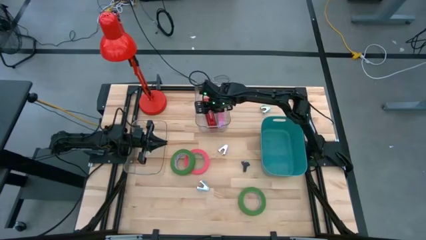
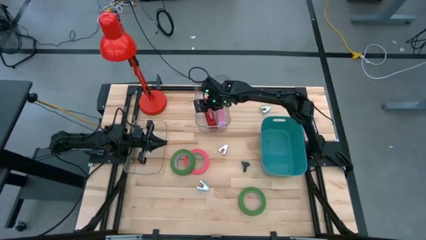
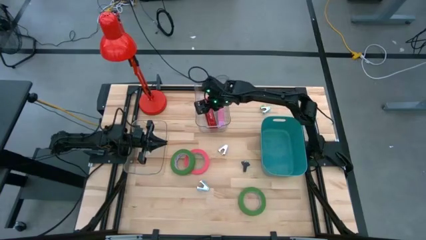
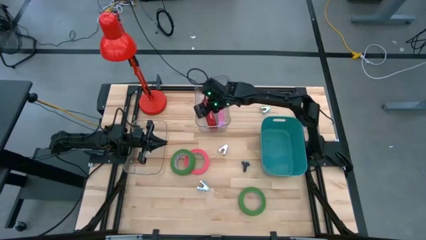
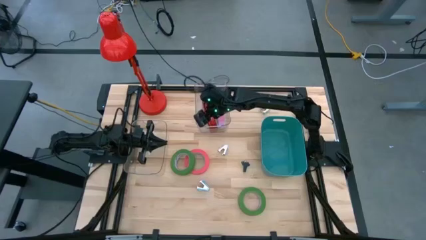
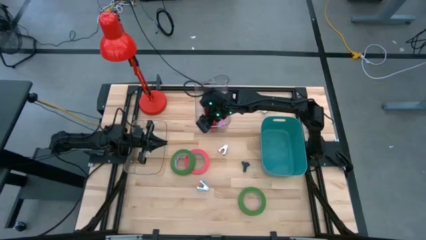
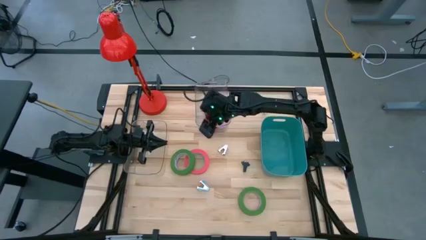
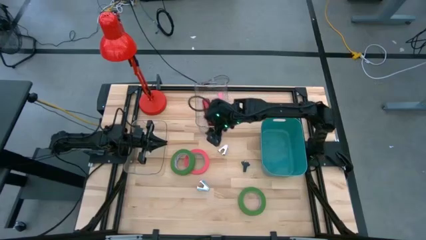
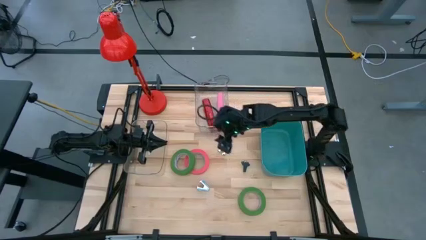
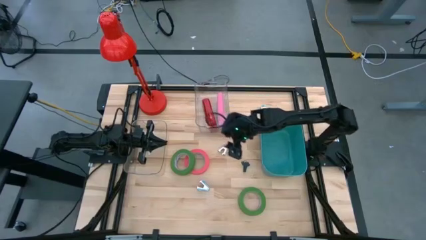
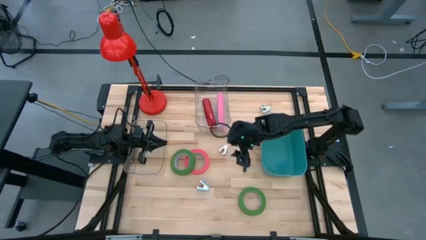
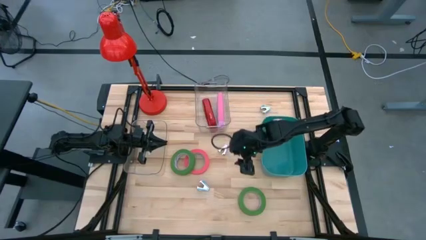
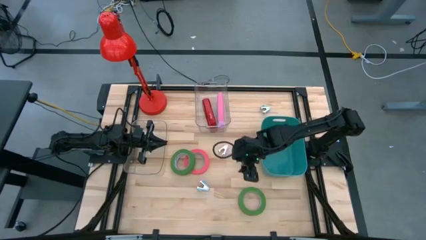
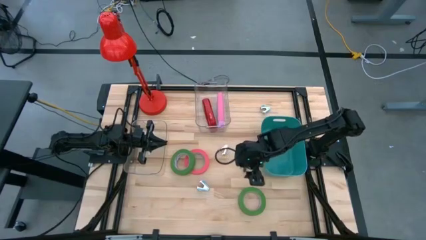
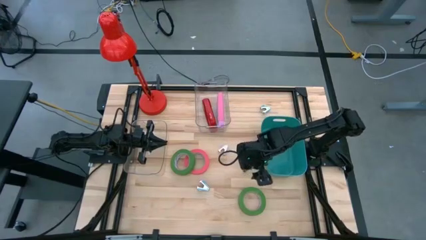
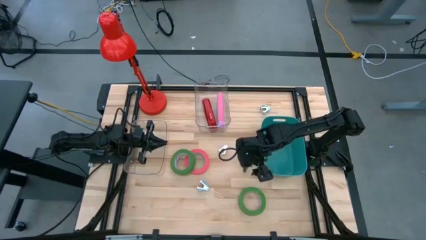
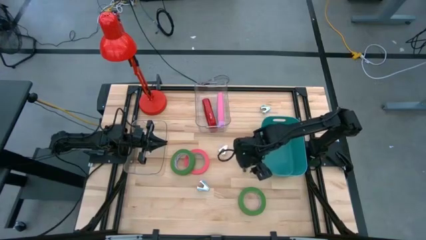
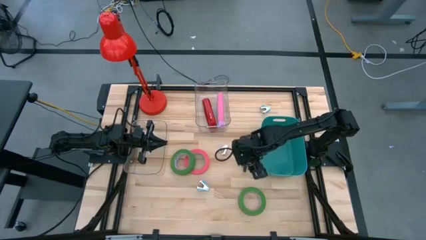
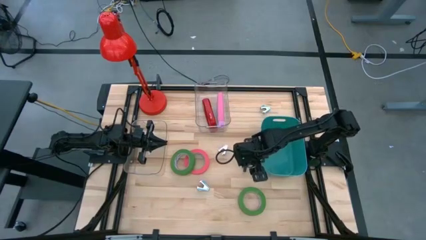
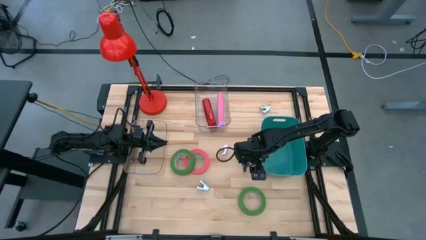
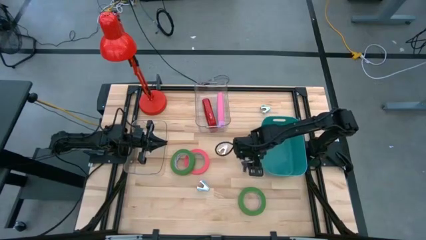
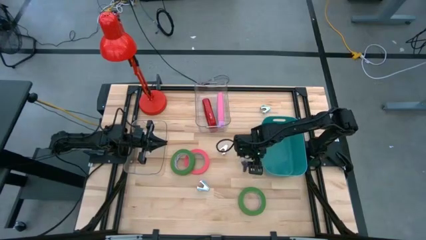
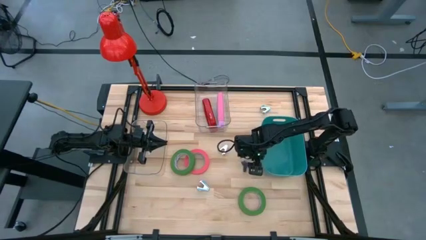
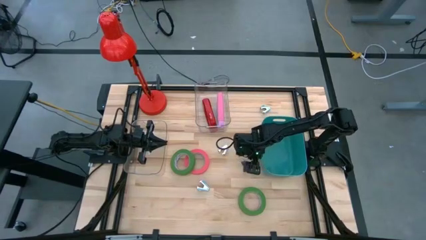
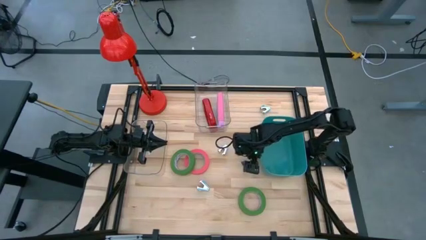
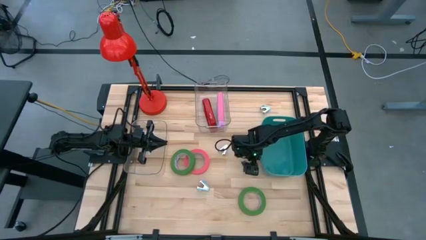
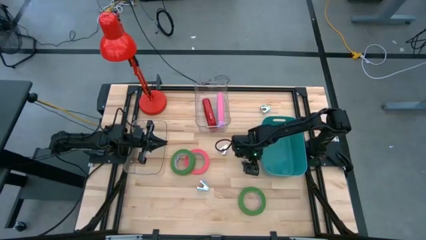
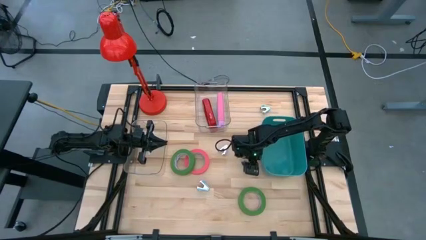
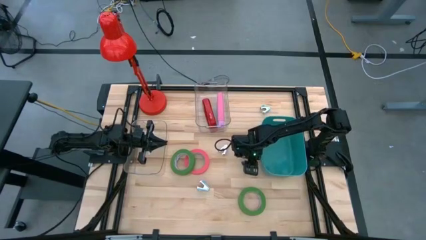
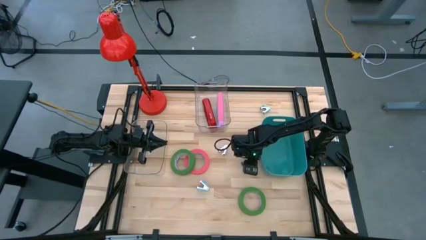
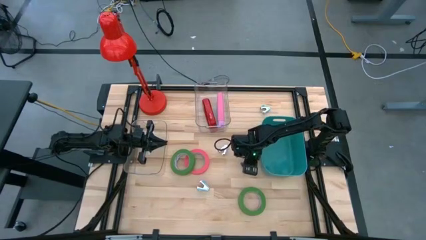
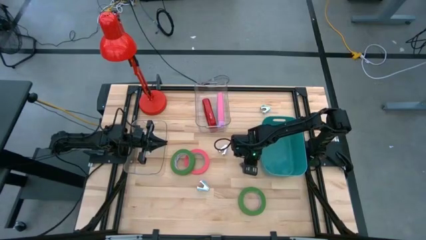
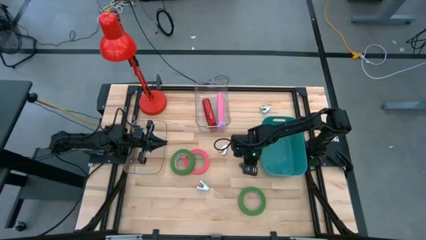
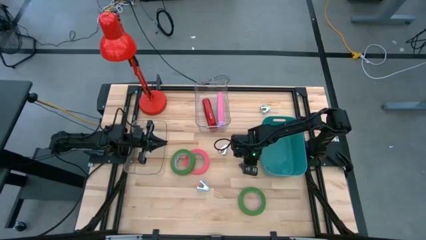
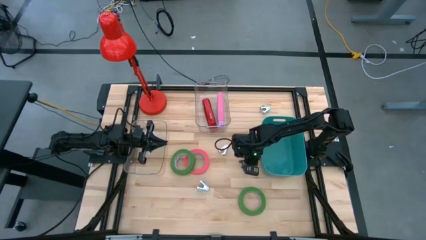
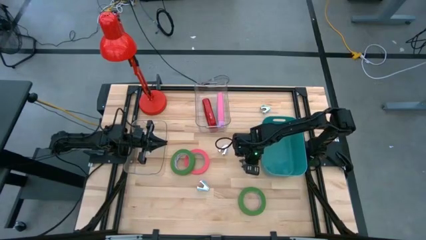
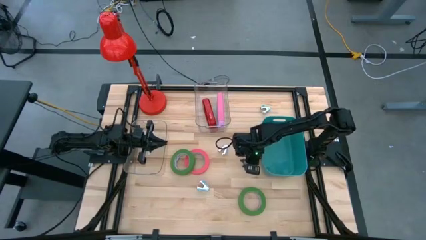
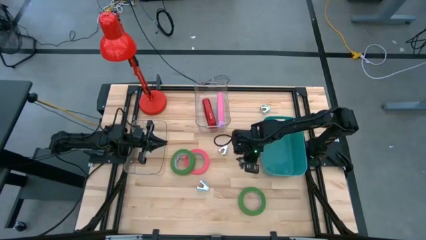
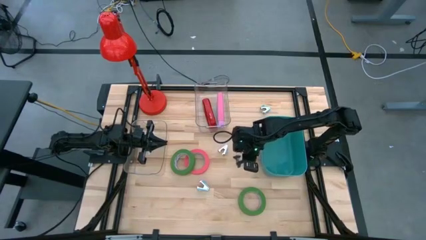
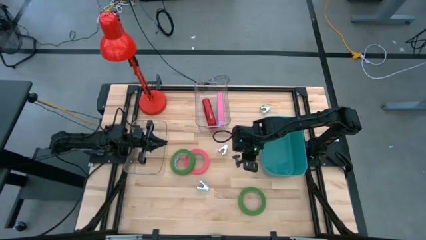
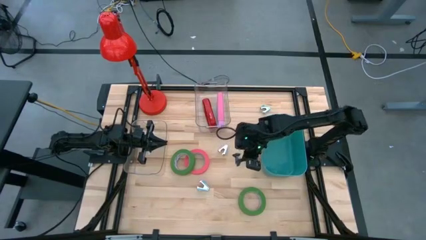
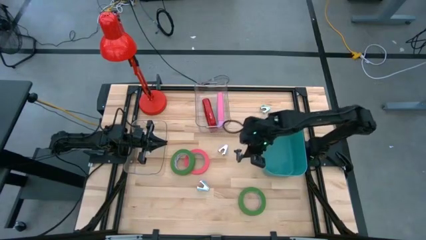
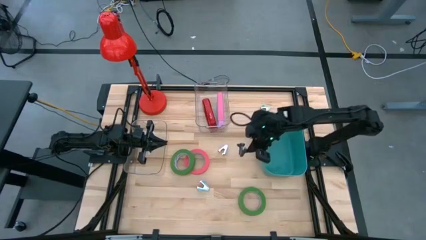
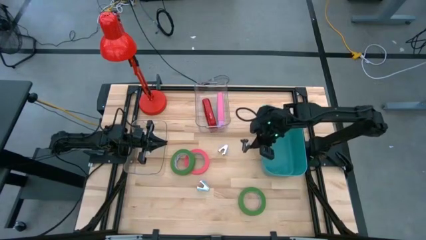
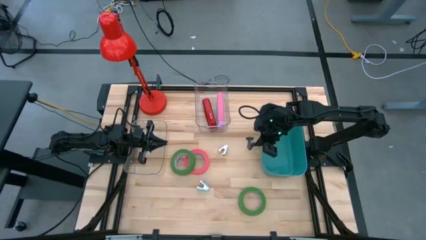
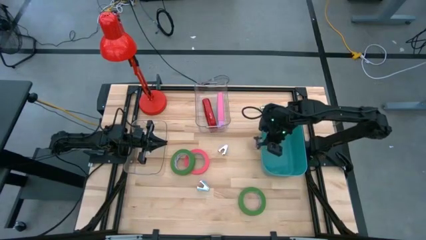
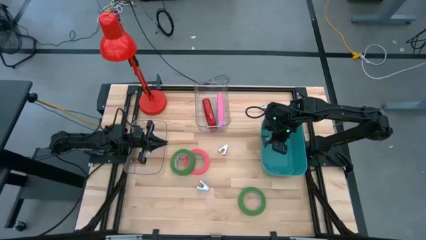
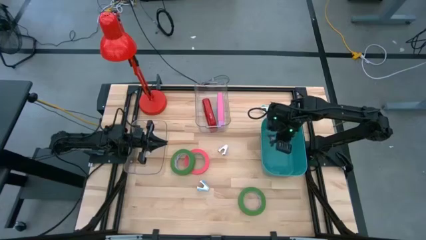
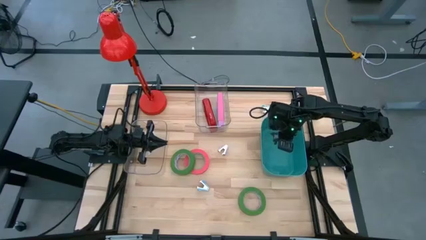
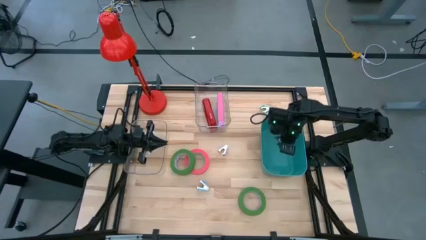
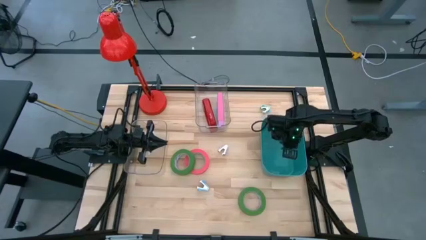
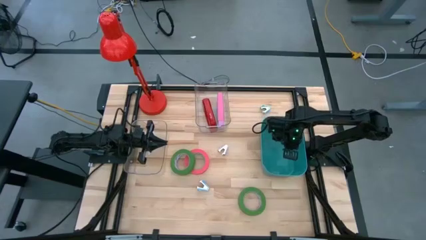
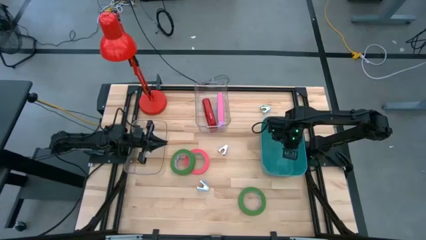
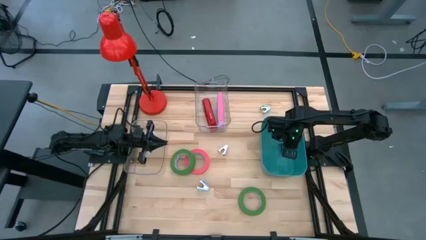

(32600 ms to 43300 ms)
Task: Pick and place Stapler, Stapler remover, tape
Put the blue staple remover into the blue bin
